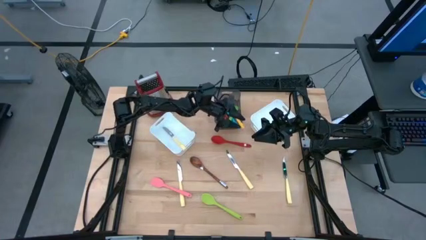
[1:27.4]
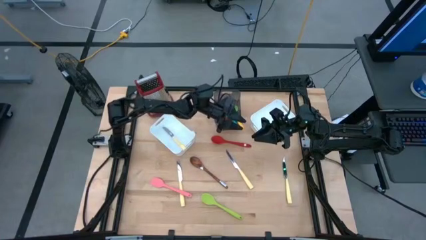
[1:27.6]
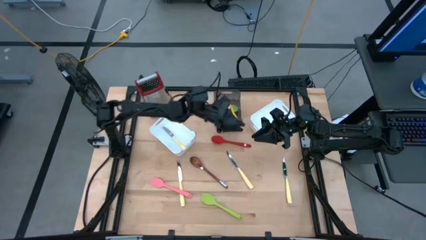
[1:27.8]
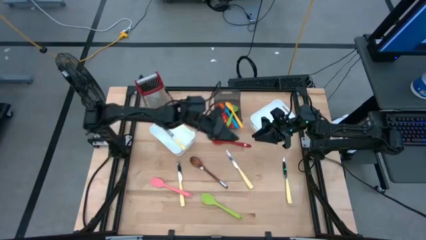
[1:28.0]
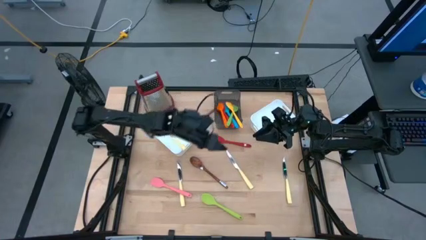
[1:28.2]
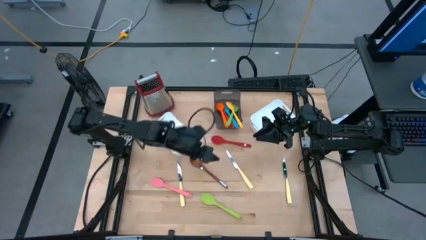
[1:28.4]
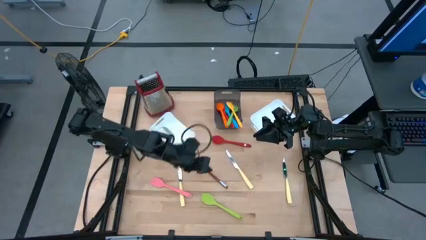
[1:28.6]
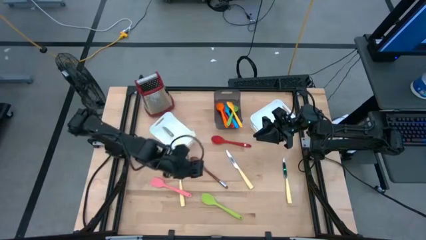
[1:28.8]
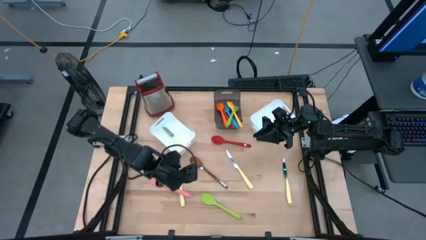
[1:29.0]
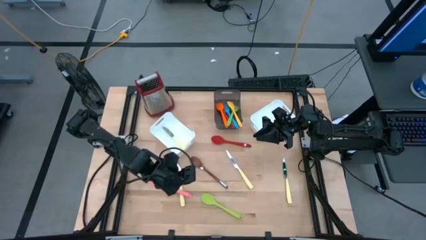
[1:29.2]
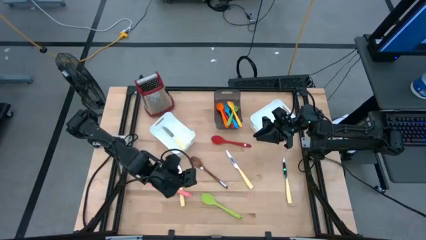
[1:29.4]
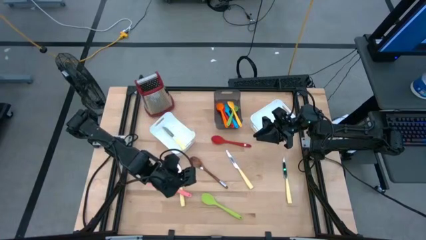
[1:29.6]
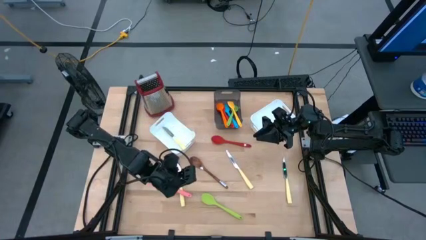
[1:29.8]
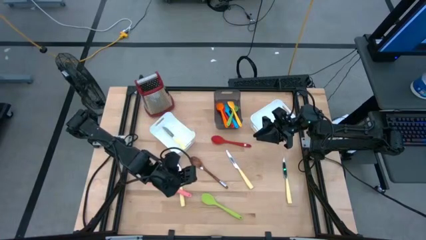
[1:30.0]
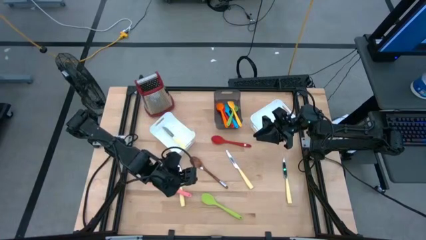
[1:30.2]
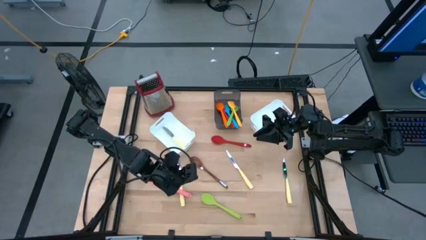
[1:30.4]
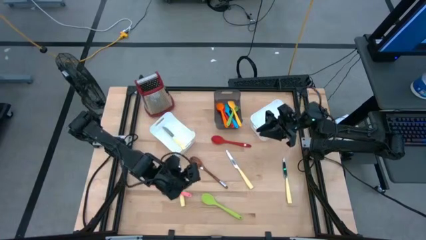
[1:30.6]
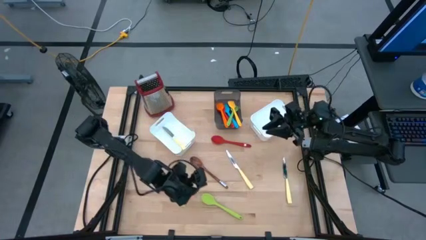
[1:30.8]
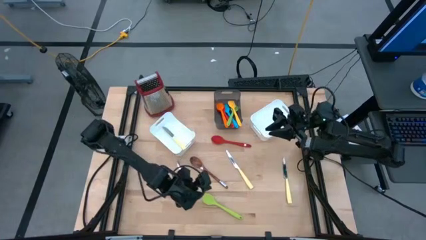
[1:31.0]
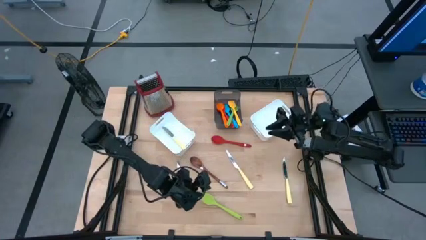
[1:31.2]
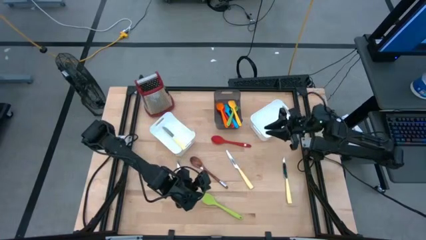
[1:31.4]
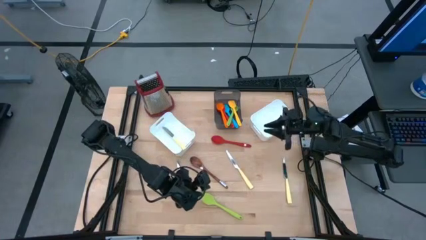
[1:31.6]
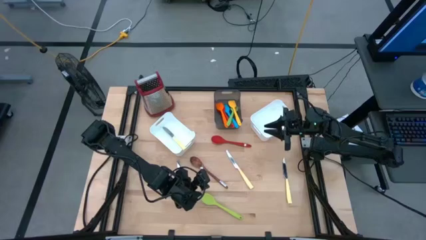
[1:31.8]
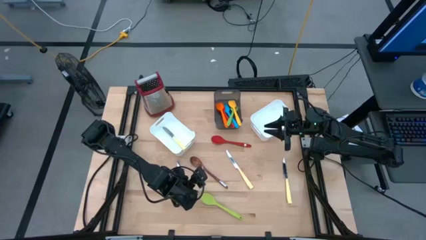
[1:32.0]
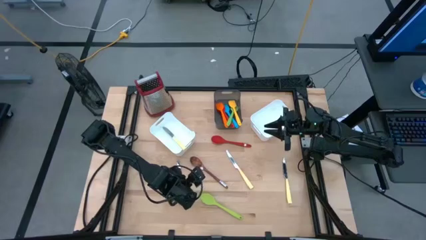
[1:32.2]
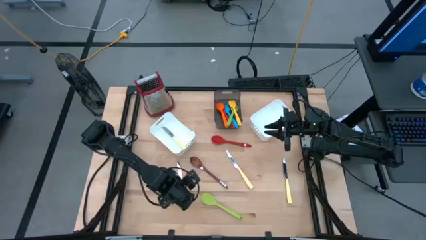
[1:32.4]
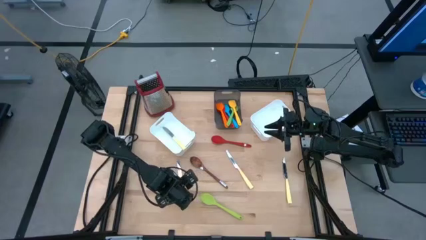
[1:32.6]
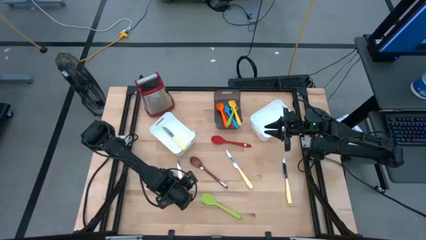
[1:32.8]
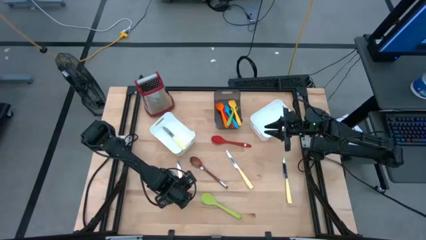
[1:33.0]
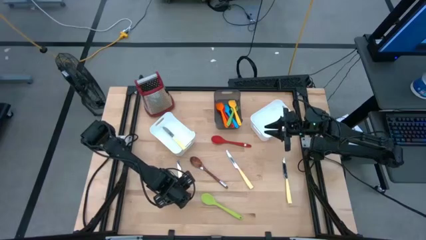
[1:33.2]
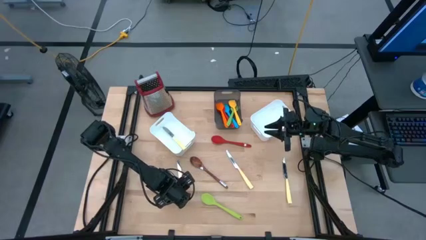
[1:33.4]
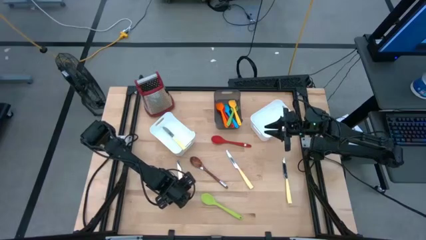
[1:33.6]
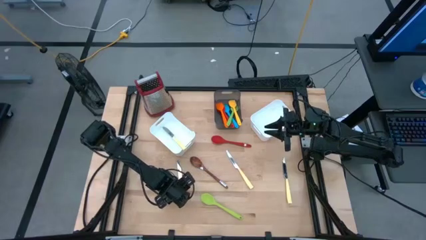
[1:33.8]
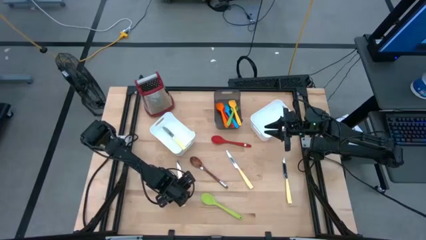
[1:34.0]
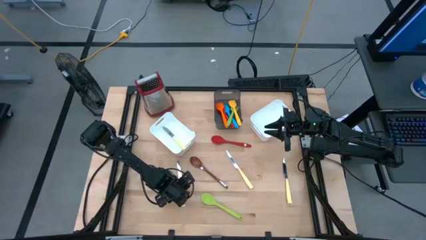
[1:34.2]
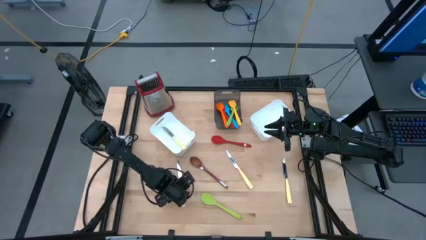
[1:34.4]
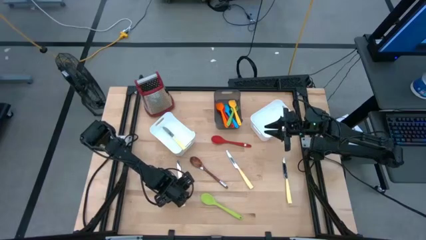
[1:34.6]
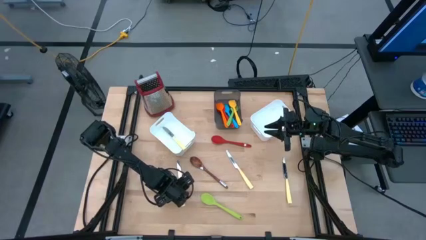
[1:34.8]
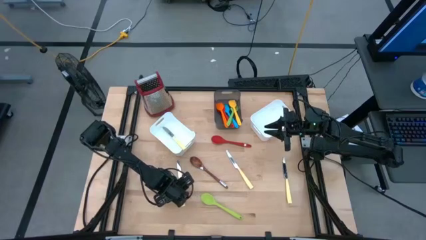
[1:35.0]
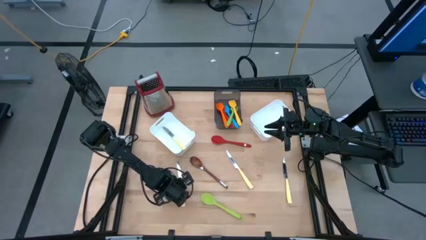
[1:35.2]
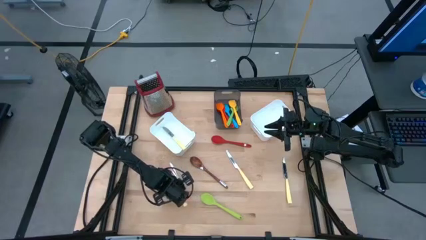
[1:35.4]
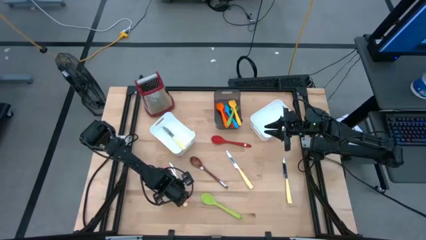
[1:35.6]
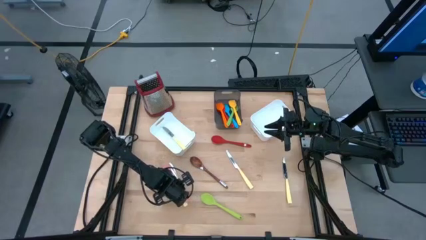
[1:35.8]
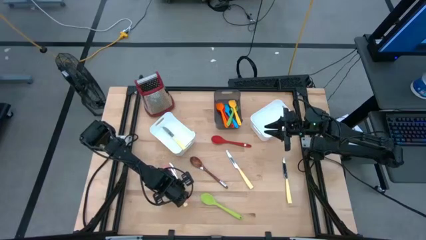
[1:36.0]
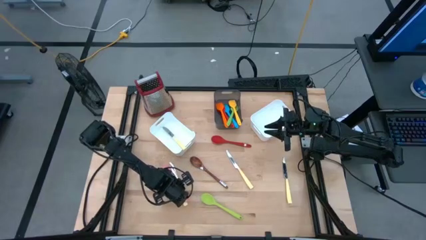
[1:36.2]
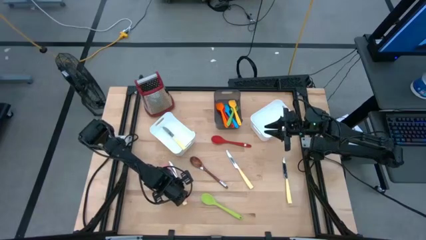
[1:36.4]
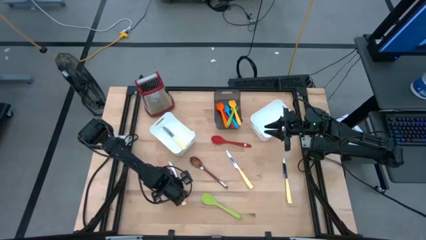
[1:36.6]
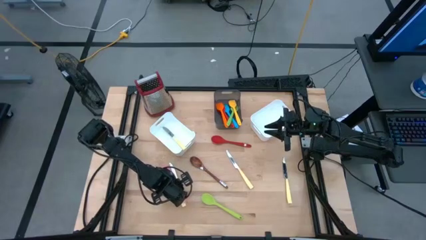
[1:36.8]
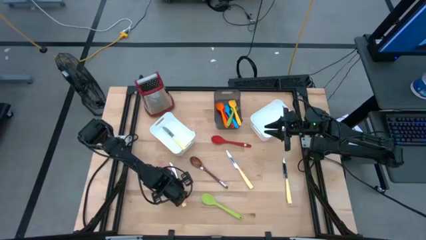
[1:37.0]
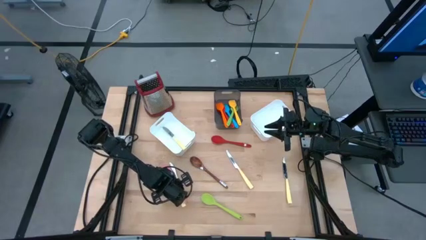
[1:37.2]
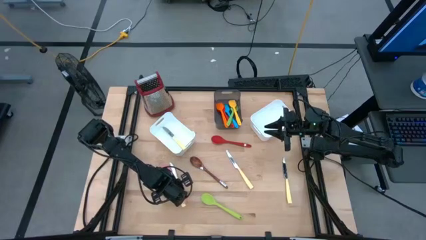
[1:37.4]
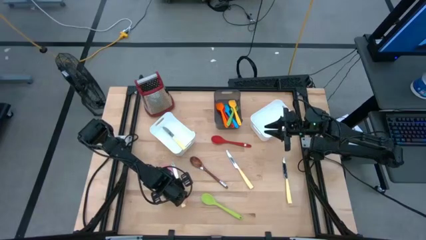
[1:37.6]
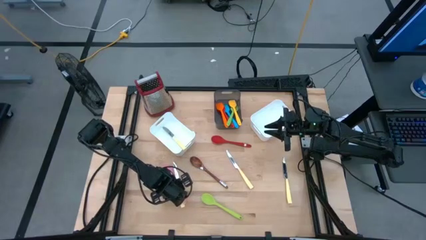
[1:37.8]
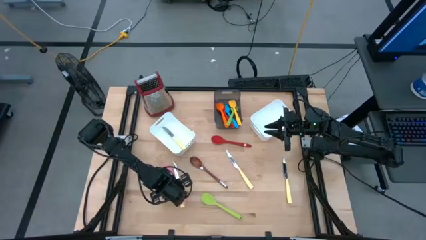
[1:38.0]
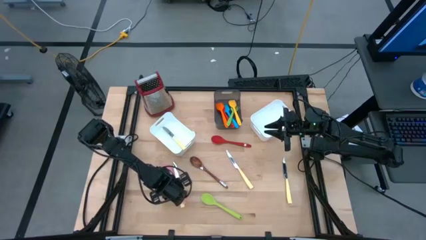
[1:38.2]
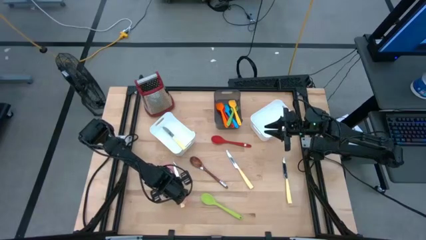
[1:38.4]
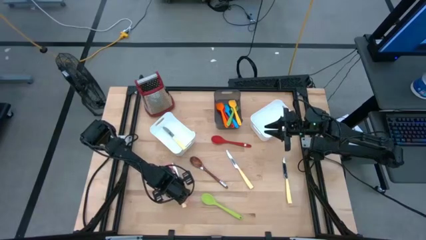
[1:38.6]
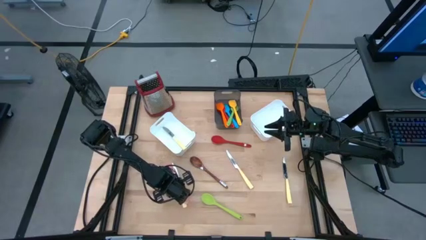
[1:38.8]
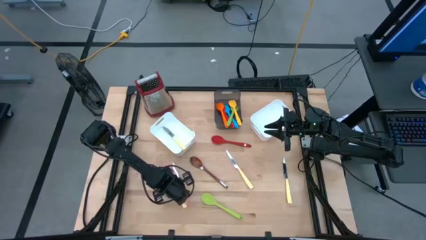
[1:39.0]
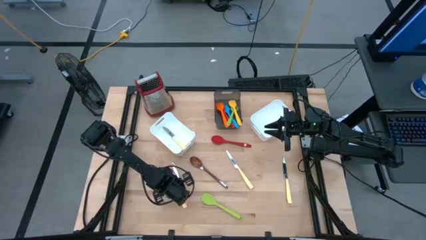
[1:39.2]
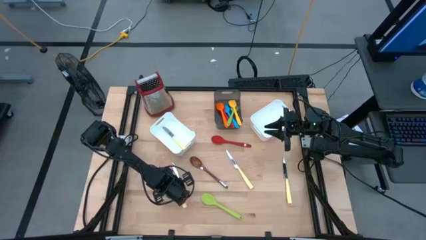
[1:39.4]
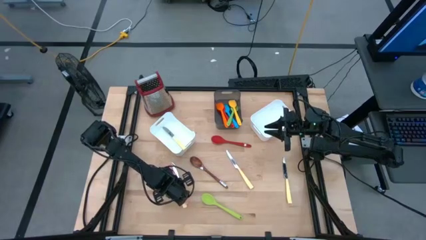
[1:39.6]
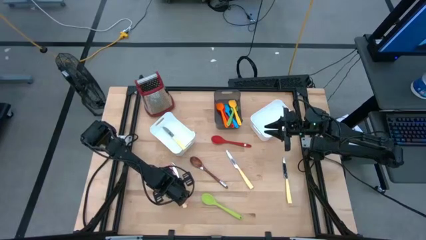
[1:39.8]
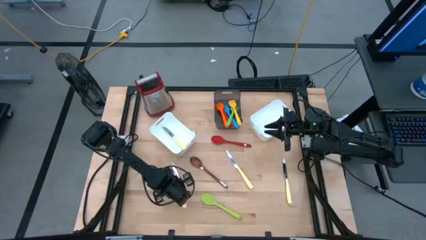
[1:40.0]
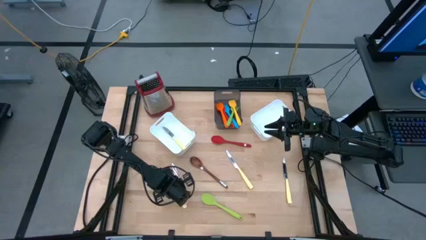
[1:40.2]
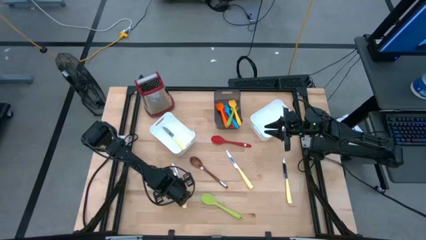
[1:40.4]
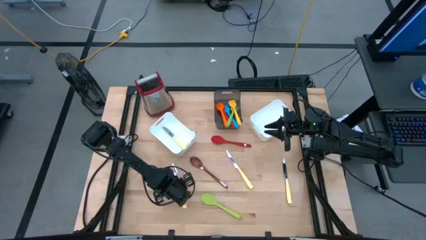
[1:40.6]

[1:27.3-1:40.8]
Task: Pick & Place Kitchen Items
Put the pink spatula into the black bin
